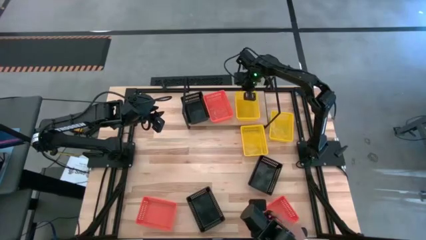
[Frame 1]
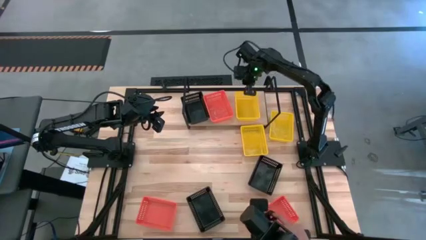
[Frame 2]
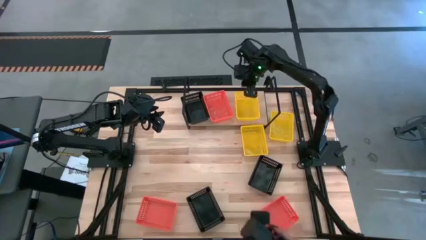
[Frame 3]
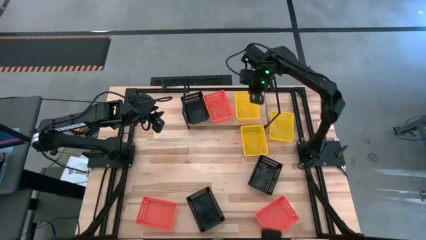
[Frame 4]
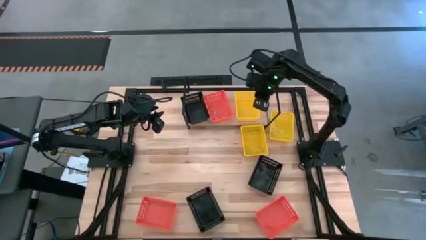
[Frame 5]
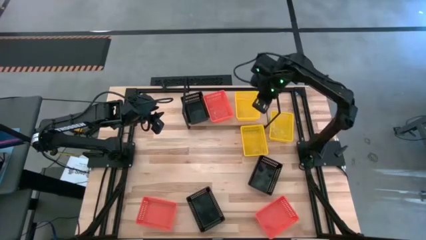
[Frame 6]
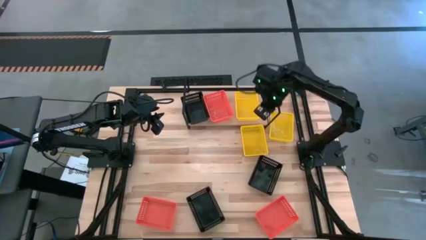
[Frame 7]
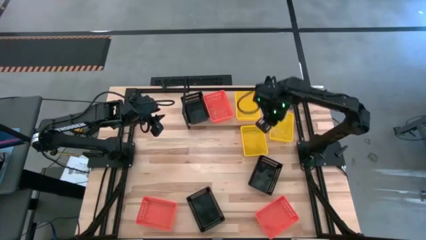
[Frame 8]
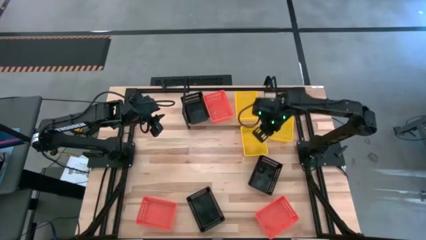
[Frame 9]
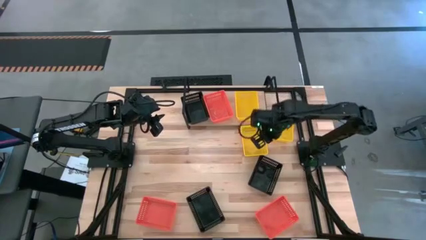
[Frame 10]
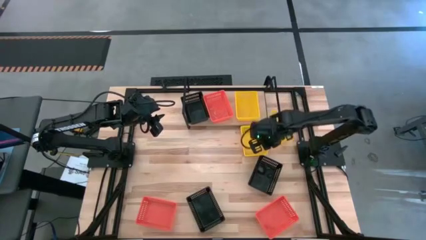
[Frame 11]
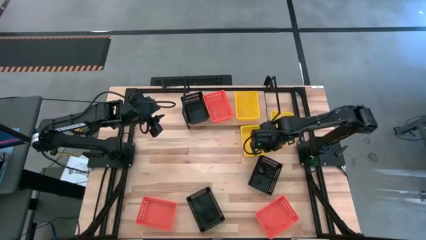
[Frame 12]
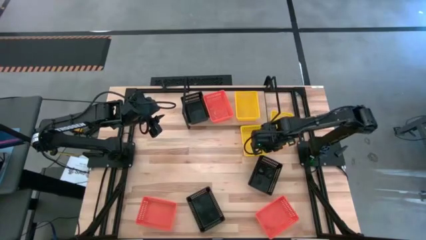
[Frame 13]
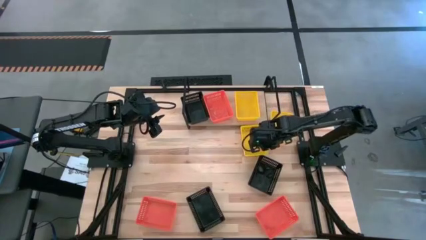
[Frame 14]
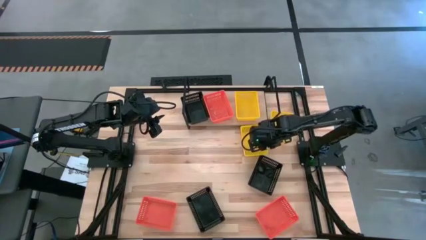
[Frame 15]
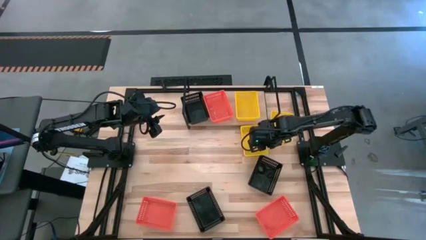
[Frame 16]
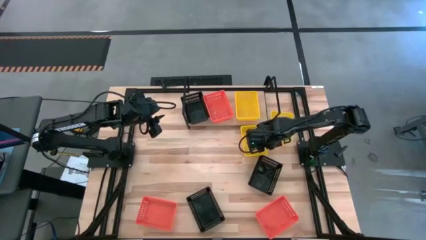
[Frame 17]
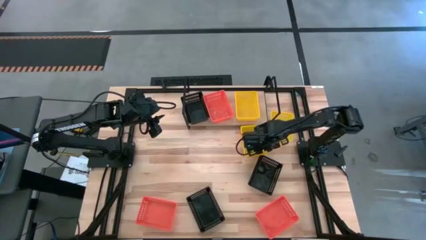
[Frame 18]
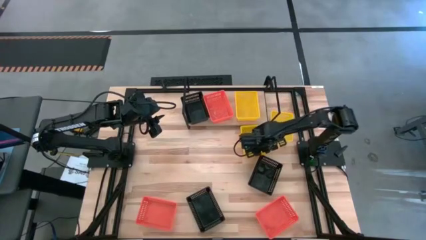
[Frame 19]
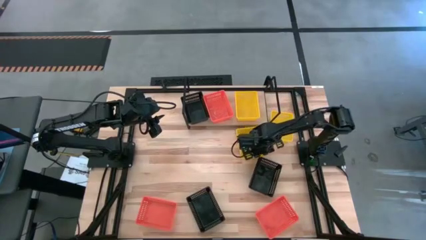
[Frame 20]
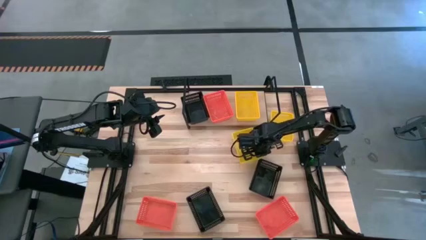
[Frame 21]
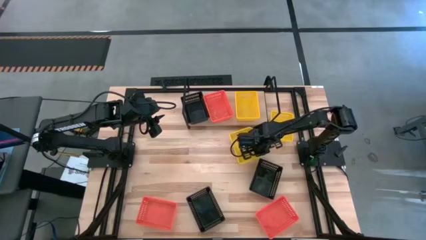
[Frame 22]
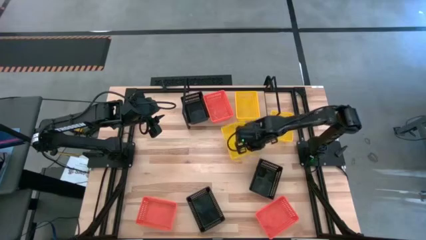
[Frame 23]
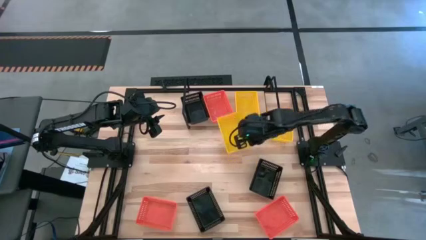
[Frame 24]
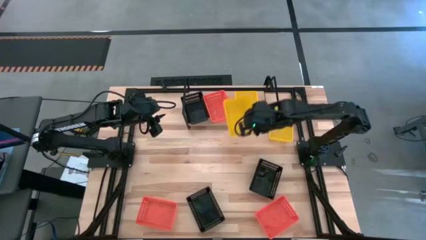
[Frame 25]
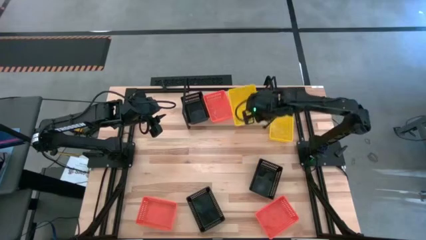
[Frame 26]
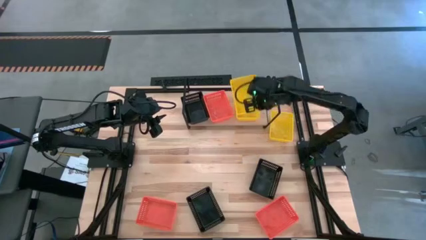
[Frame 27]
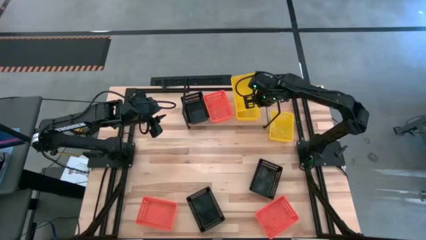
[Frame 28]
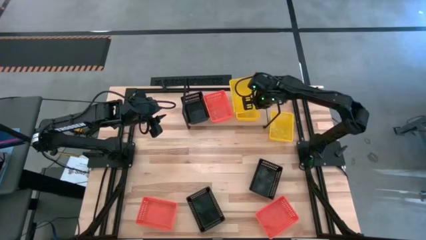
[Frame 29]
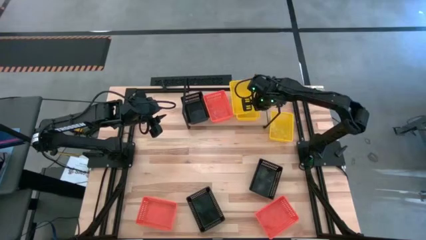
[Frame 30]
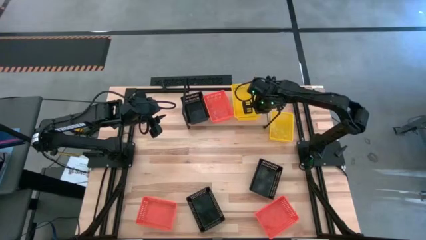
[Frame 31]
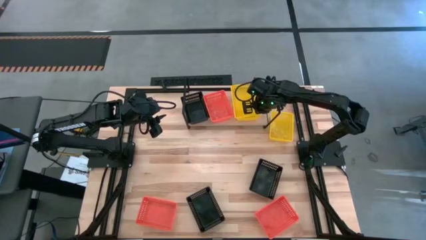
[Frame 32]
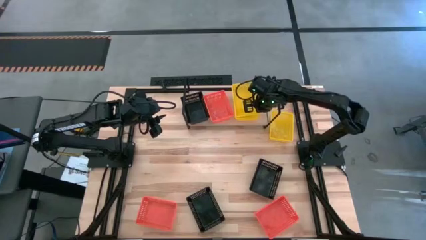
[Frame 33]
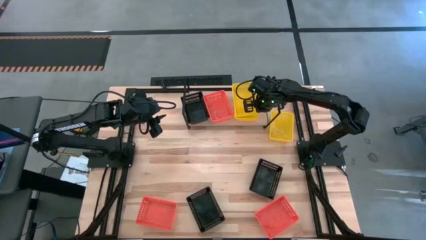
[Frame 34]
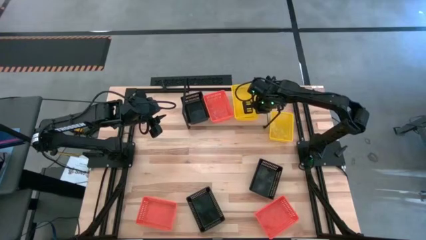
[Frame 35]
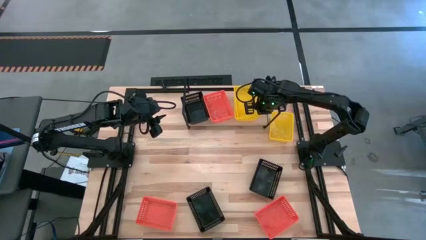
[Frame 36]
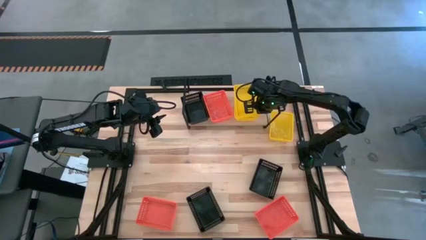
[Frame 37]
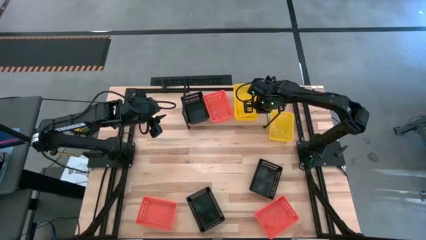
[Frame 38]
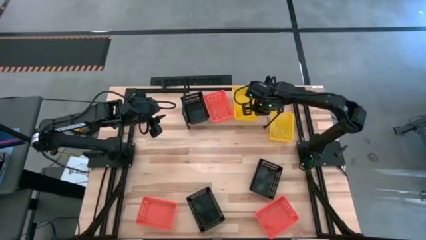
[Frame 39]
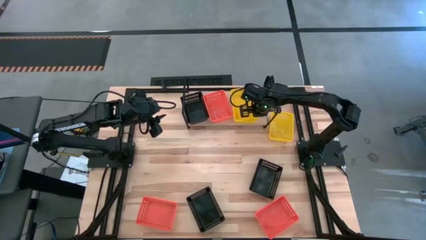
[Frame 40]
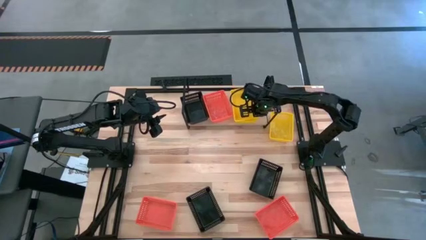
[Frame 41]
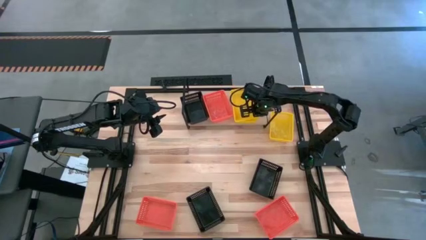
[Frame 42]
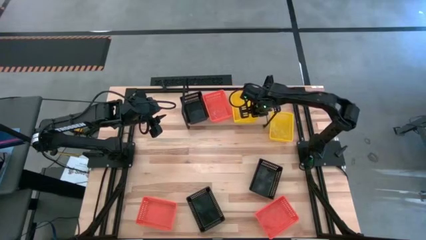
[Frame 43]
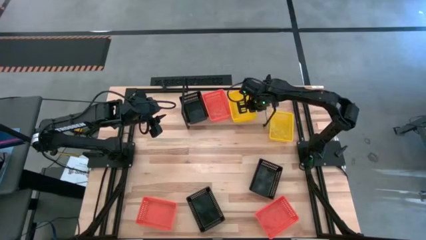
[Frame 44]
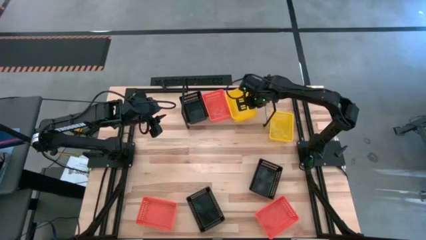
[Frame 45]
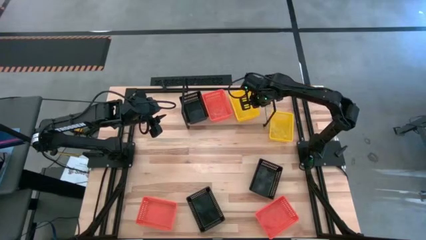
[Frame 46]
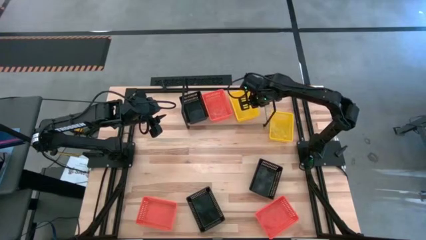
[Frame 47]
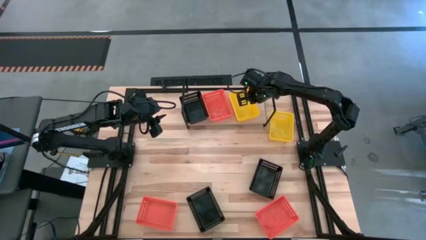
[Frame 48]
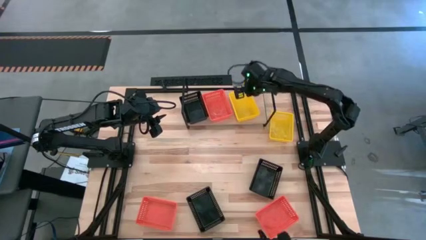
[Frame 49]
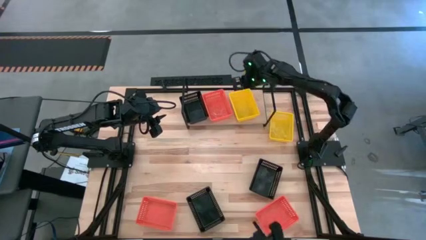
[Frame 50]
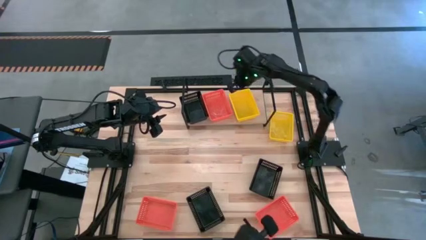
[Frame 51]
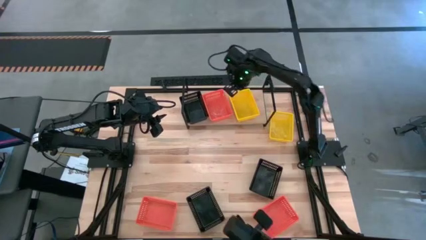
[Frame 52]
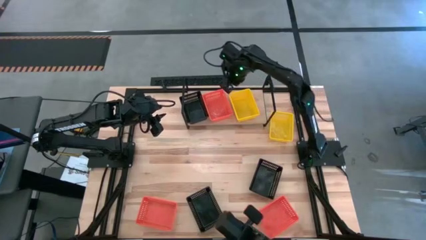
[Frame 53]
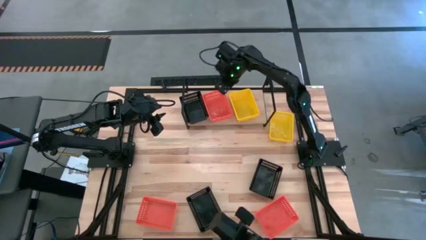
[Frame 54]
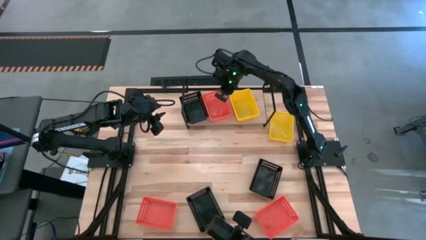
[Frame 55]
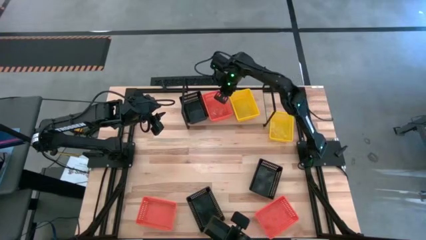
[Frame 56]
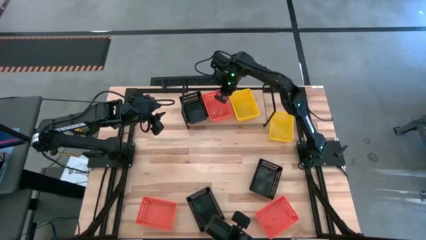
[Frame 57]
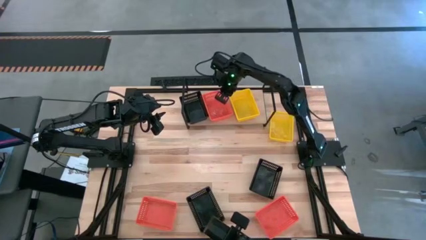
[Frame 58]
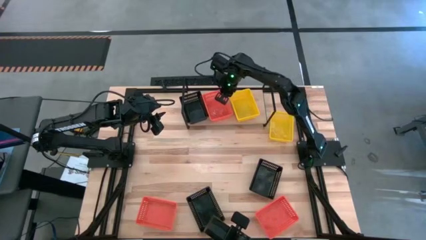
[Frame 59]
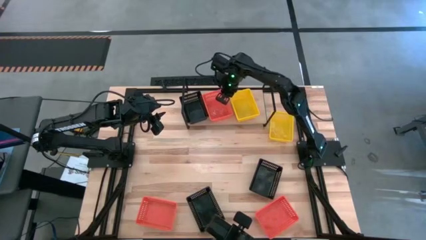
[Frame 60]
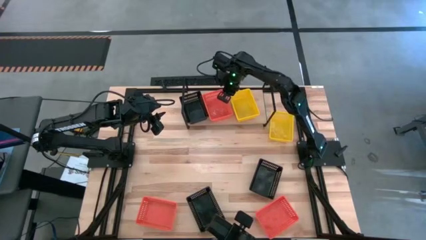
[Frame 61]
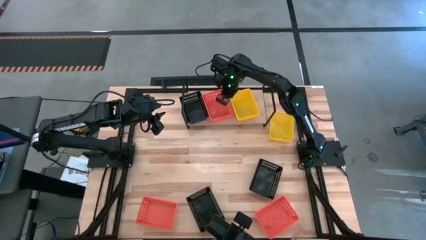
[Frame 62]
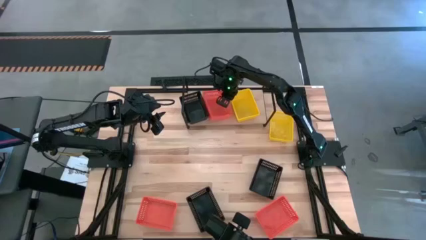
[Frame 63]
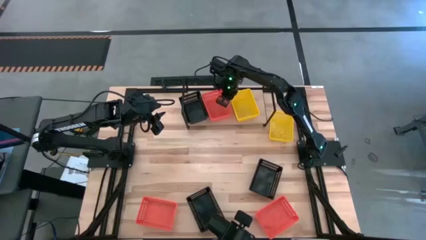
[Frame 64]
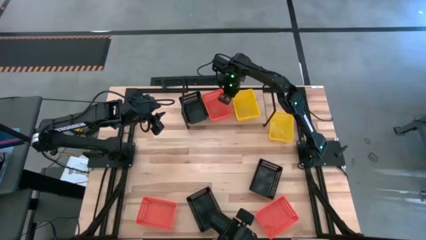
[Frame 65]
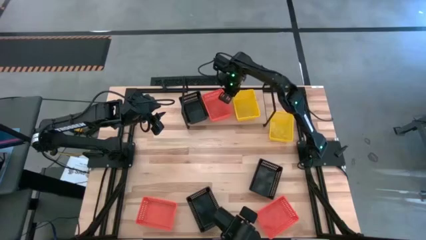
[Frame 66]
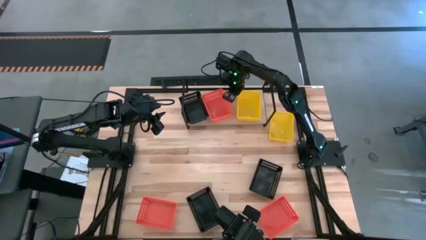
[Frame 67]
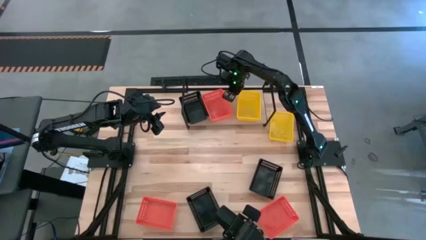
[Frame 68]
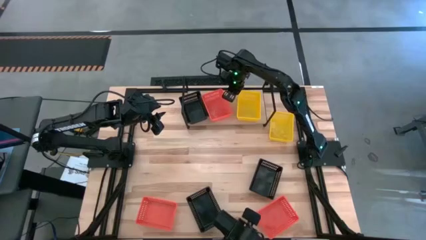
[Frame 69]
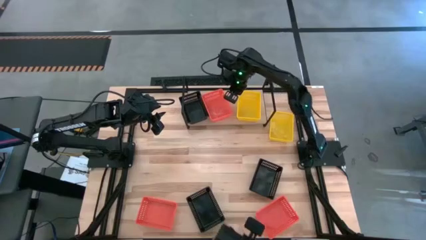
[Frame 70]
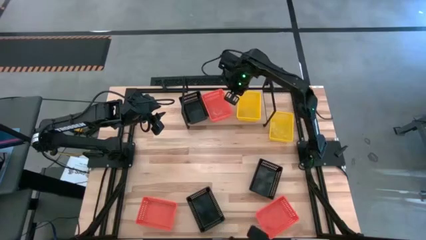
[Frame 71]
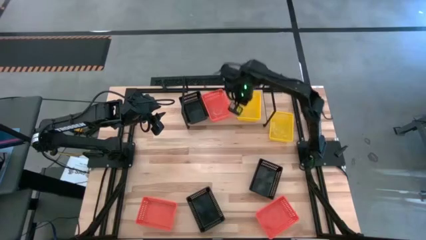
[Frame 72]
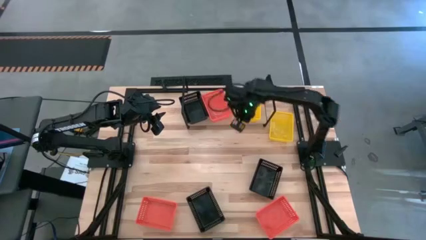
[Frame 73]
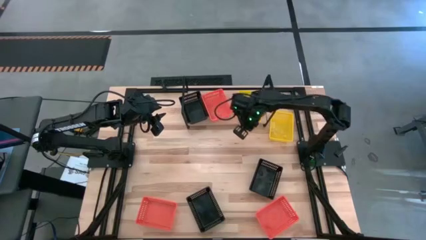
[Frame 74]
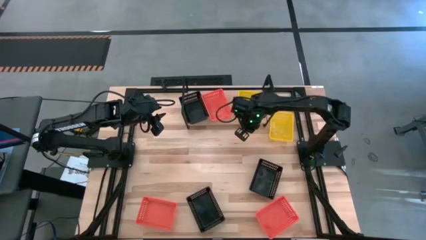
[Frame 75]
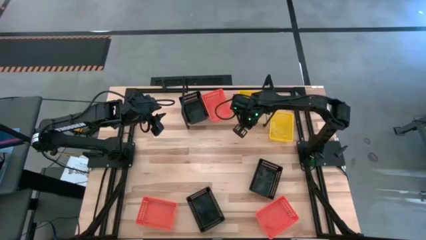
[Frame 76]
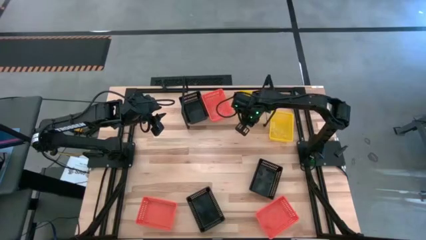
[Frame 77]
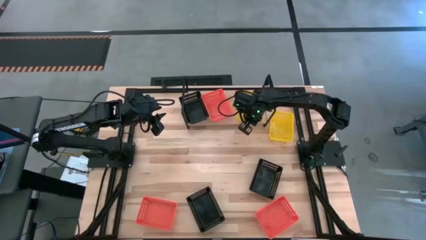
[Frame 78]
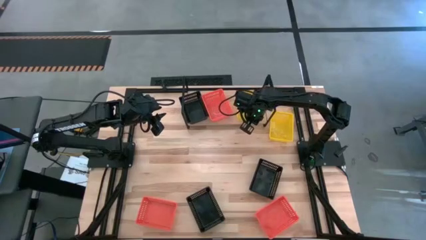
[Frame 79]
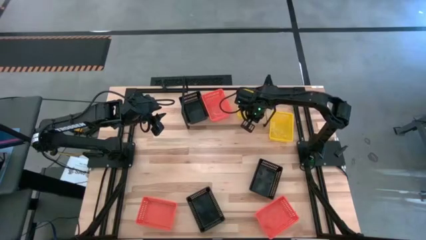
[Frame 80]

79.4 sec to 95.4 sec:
Task: Stack baskets on shelf by color
Stack the left yellow bin on top of the other yellow bin on the shelf
